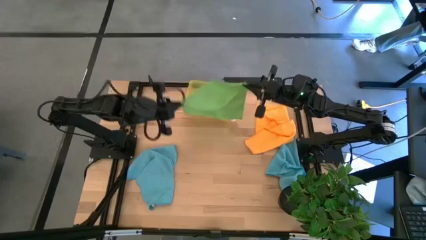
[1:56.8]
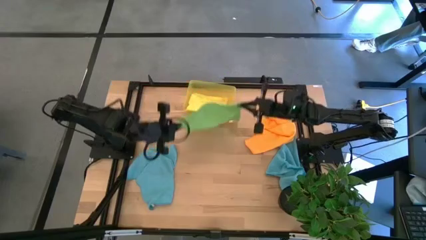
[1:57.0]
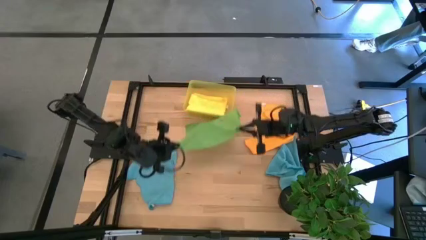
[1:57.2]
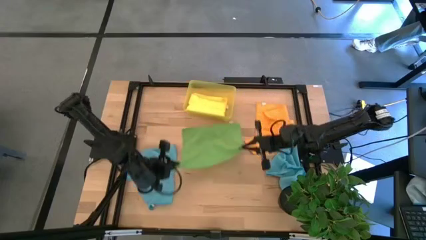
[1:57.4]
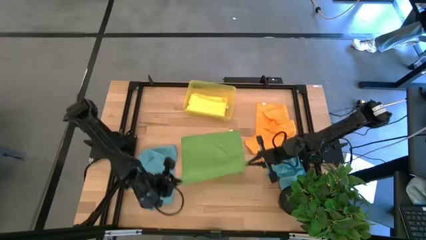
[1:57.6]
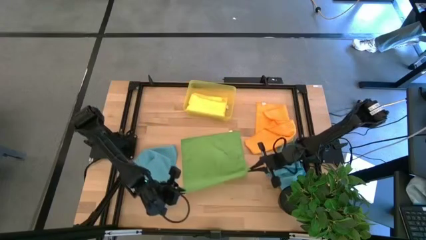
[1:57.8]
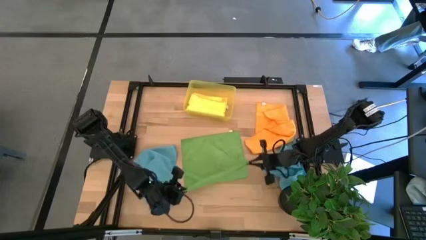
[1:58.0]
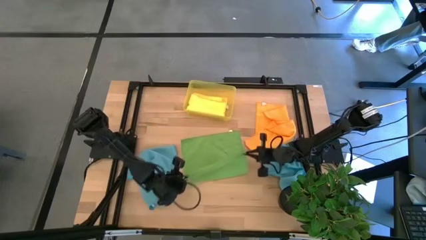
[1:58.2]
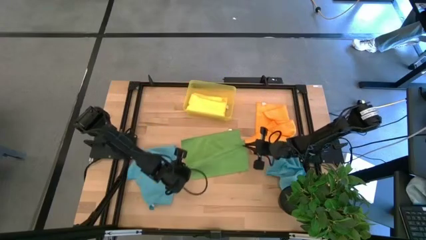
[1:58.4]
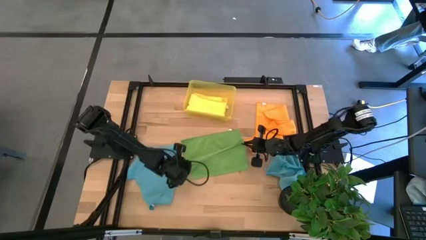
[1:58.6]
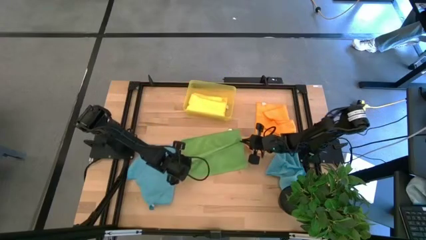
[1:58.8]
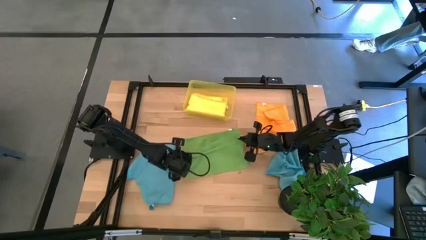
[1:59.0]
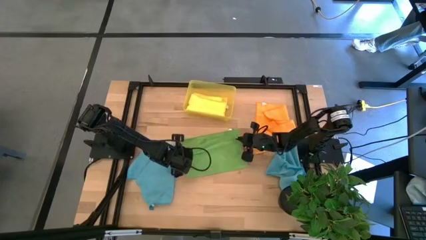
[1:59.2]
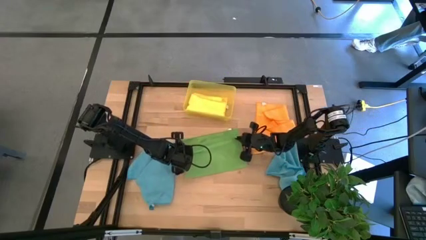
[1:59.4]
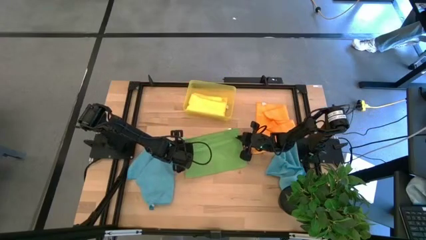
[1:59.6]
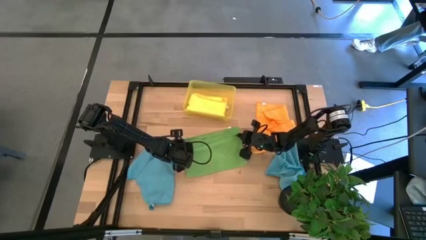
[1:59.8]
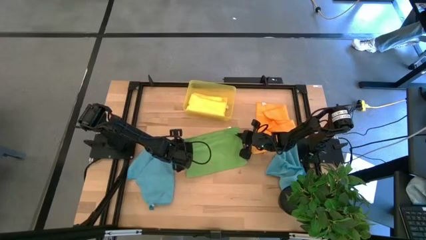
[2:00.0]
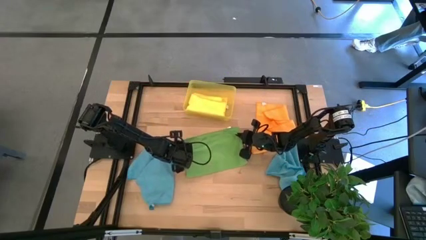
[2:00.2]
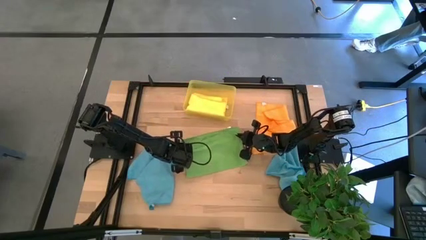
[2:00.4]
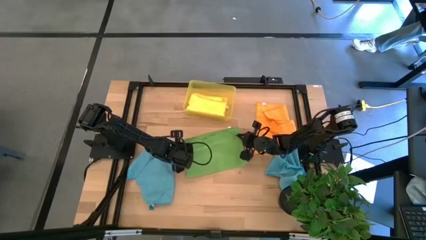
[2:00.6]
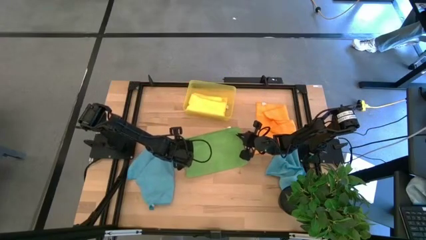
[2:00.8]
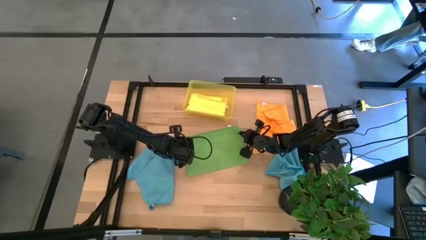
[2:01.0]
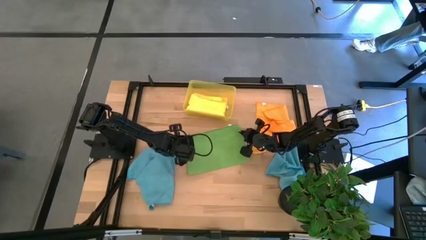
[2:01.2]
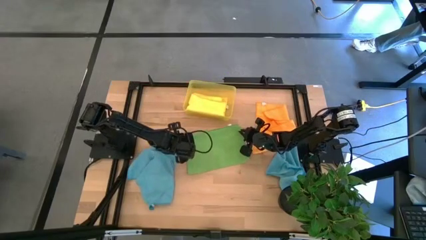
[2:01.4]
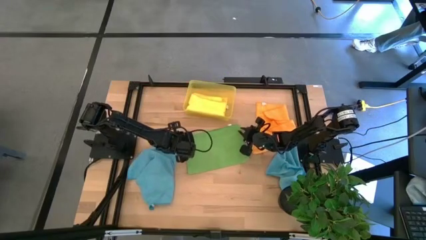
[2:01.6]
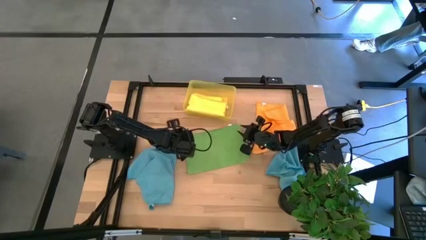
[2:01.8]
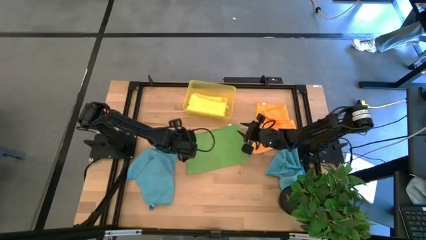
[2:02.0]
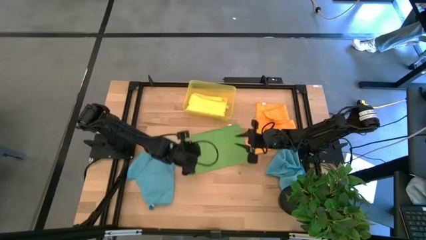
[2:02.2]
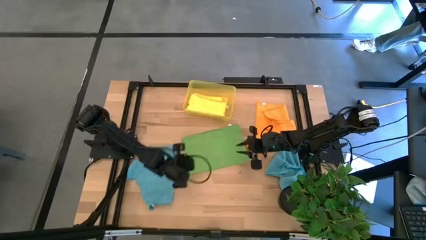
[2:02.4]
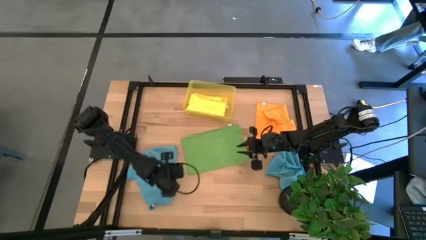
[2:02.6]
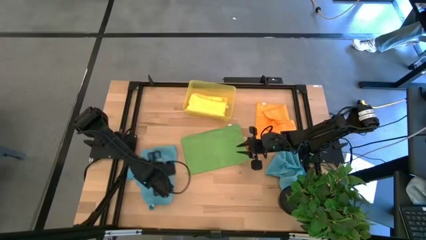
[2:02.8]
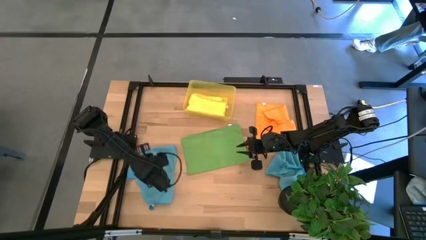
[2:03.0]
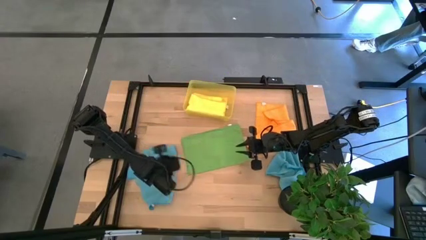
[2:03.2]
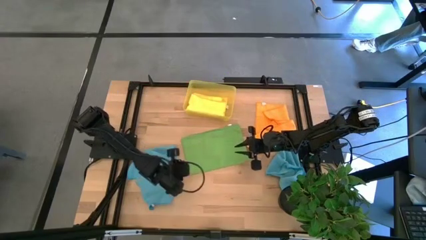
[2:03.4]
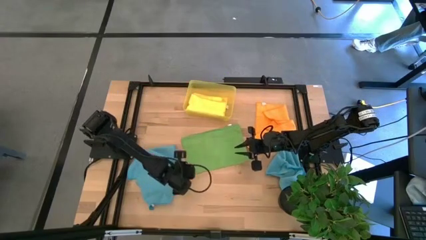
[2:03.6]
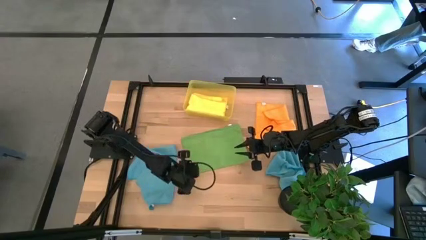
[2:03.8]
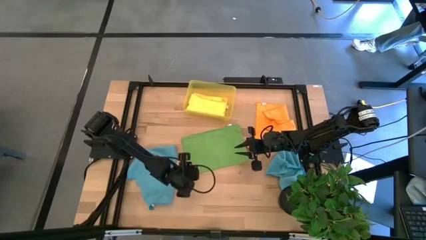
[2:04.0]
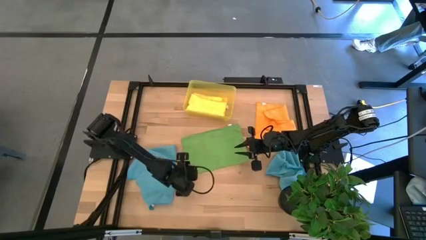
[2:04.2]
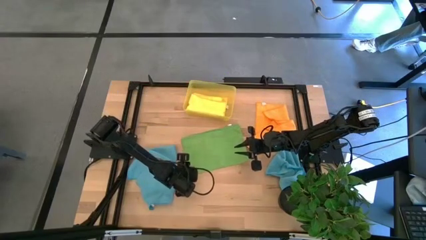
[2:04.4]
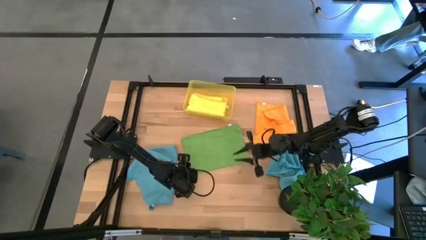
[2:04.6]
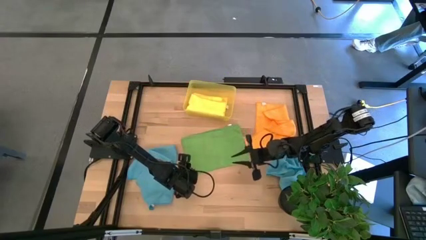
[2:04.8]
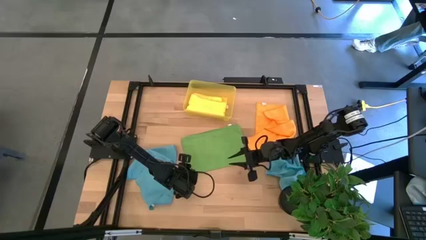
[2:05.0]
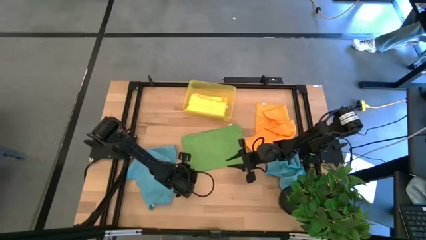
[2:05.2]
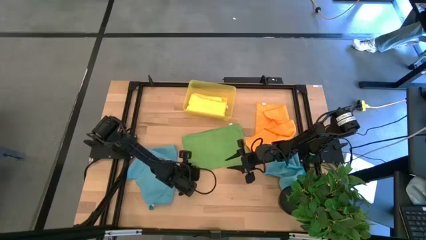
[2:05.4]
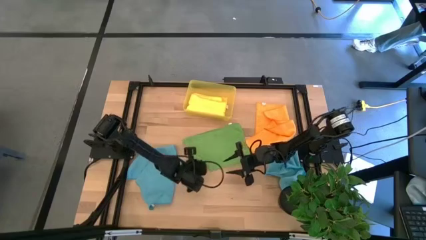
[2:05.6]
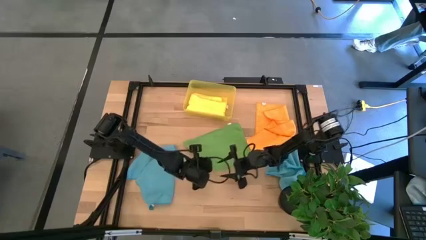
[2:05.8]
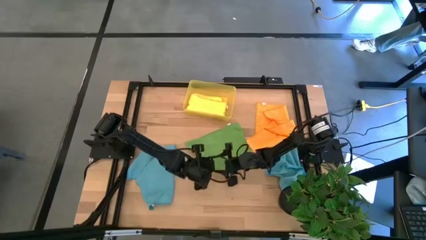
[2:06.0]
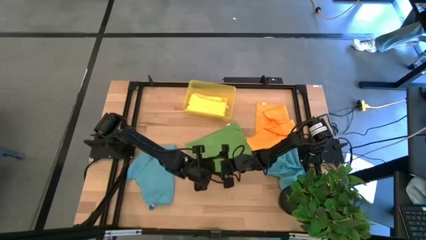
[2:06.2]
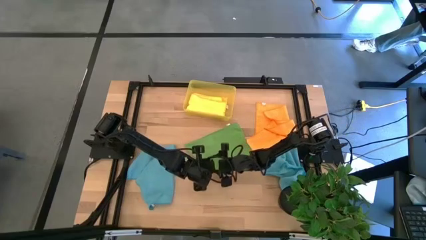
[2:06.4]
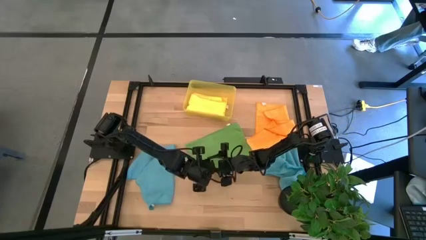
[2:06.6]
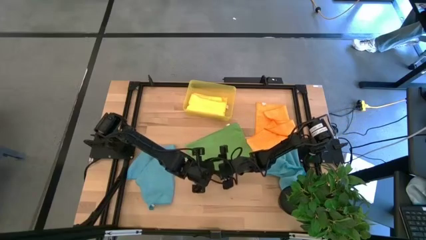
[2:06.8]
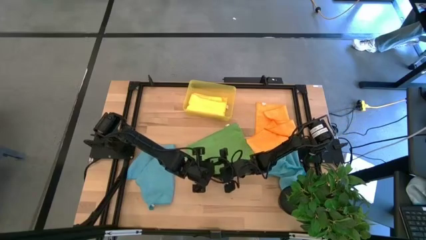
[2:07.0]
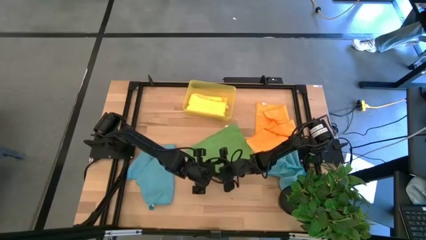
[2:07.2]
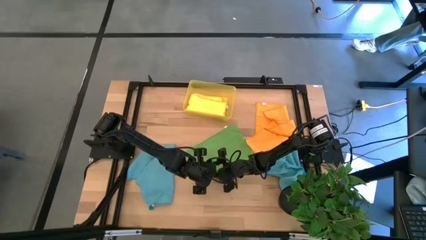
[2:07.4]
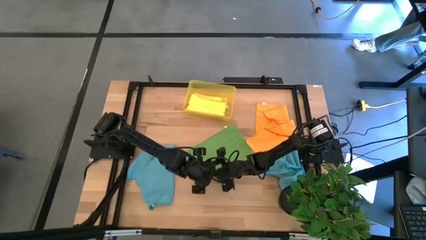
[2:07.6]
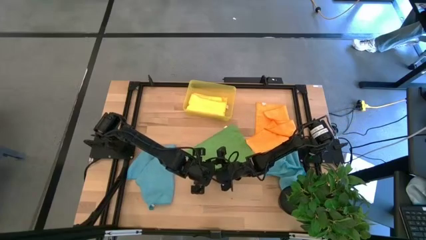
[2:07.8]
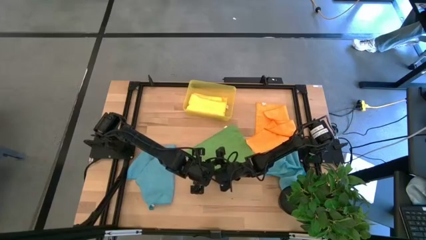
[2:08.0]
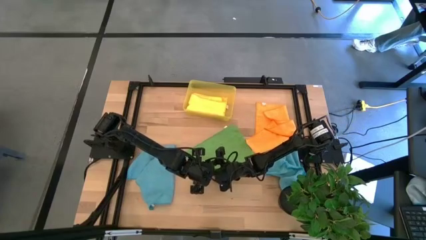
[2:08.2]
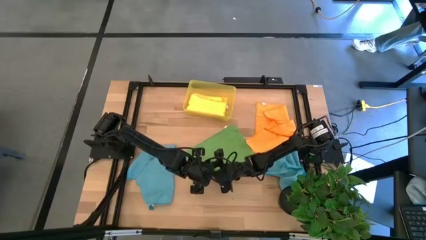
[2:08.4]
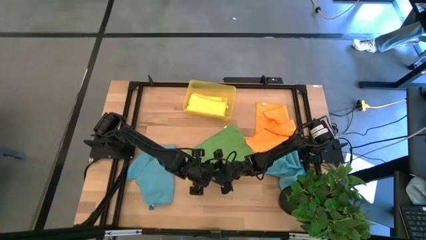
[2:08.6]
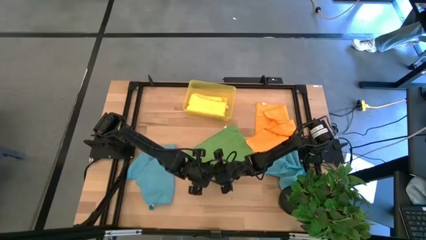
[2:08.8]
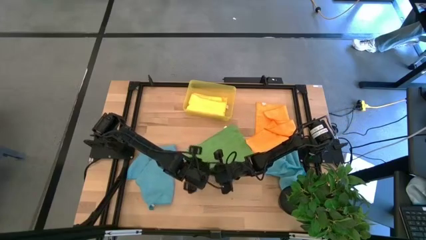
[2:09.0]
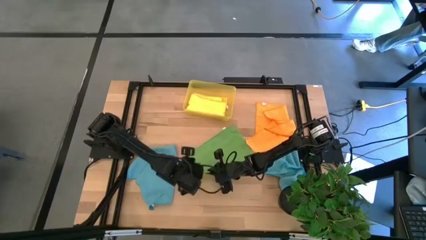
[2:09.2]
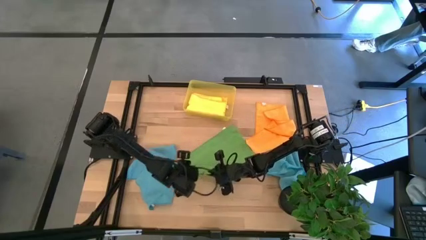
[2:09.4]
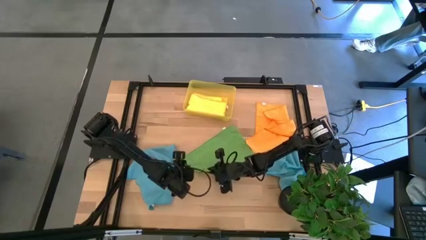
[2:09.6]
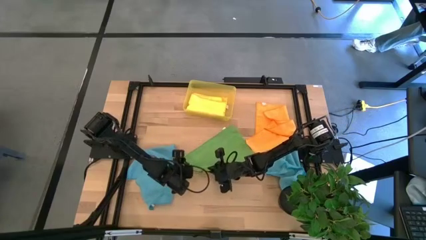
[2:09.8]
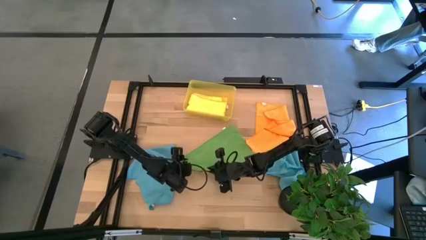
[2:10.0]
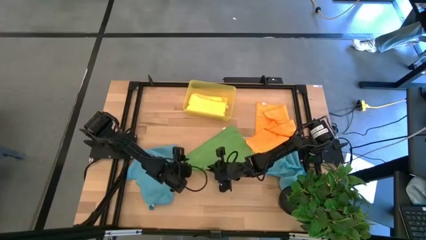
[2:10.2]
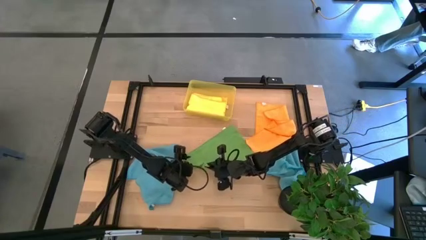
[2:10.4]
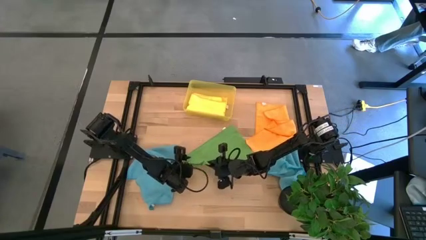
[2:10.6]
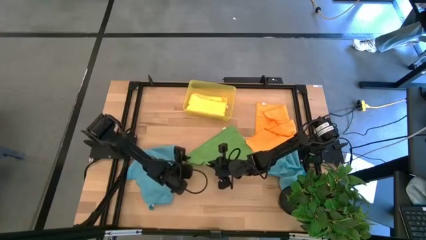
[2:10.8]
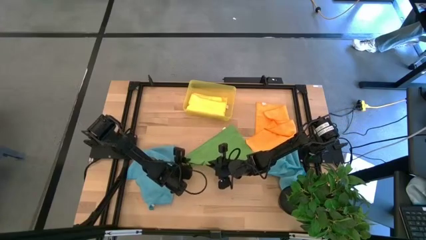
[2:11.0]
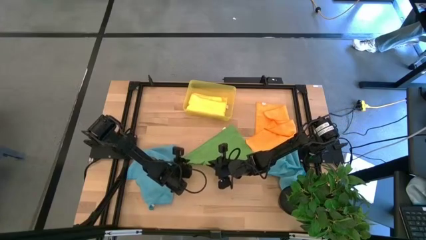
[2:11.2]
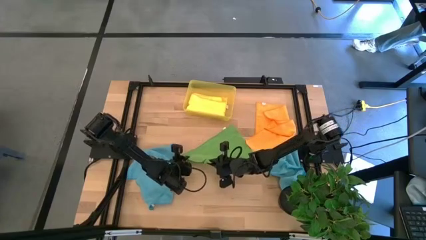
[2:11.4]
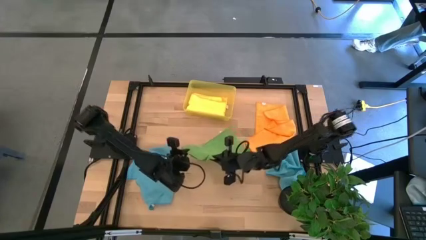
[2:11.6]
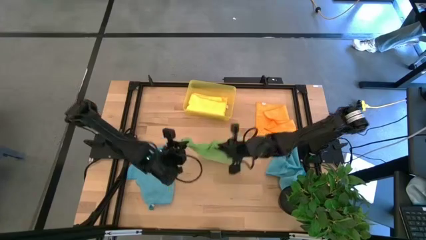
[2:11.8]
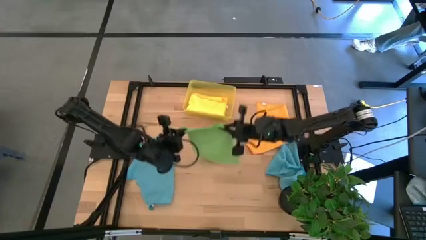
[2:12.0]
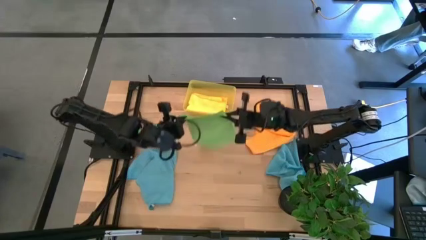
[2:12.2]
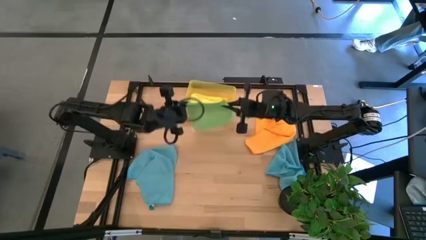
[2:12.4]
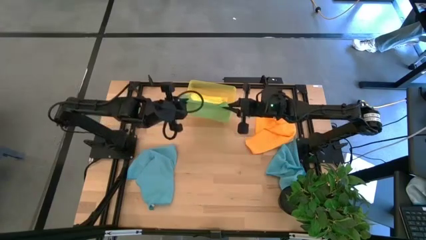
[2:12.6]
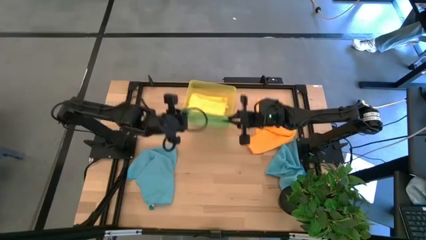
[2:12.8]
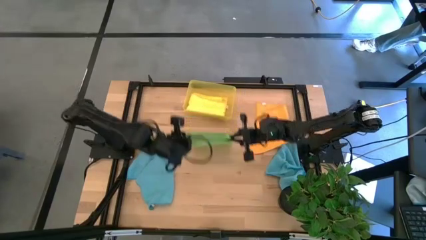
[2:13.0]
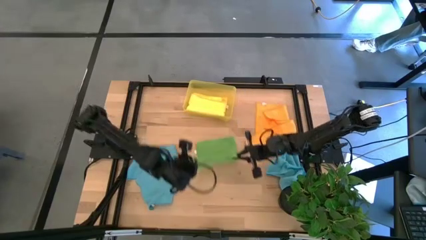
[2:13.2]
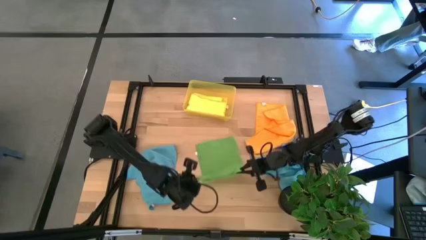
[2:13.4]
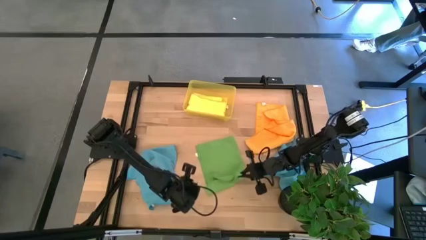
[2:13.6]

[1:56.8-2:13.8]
Task: Fold microfiber towels
Fold the green towel
